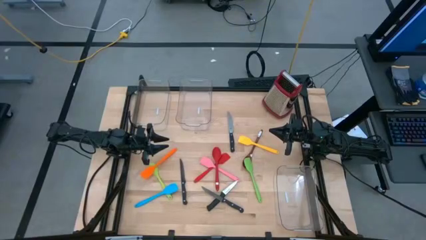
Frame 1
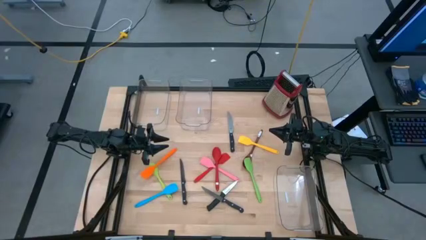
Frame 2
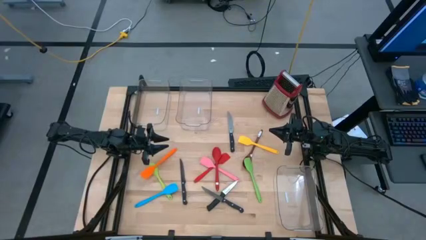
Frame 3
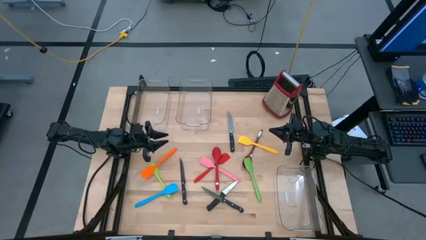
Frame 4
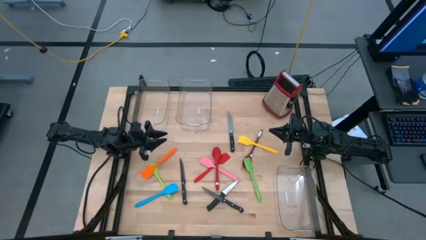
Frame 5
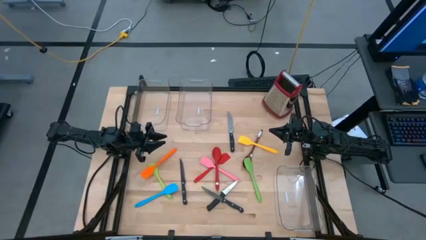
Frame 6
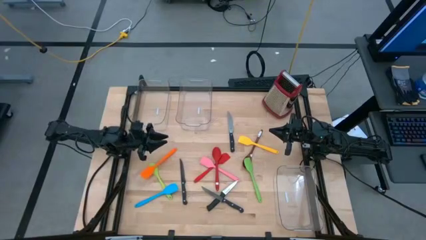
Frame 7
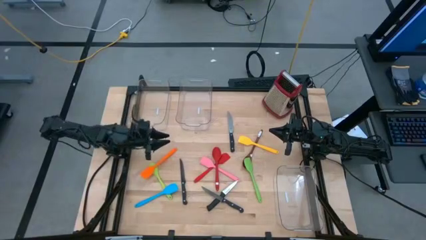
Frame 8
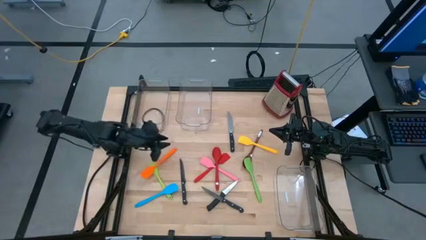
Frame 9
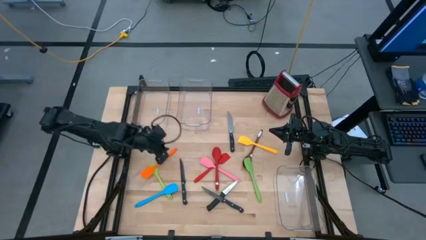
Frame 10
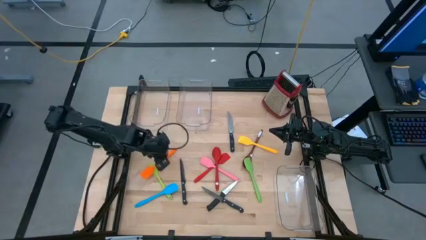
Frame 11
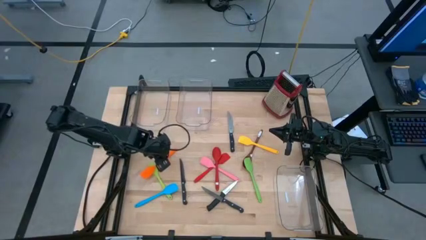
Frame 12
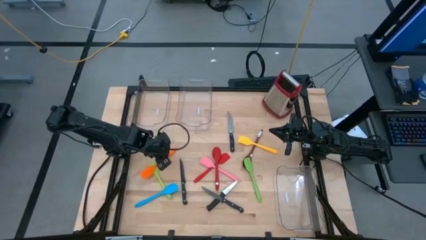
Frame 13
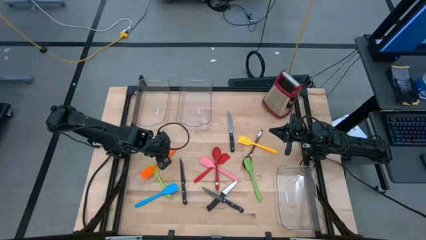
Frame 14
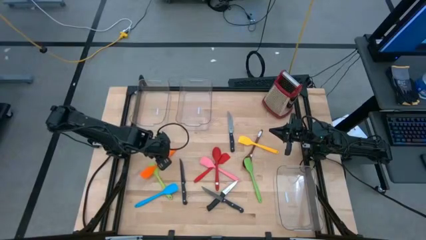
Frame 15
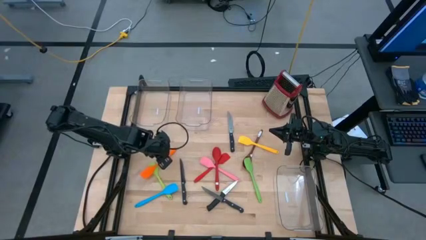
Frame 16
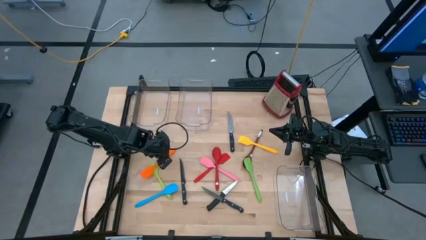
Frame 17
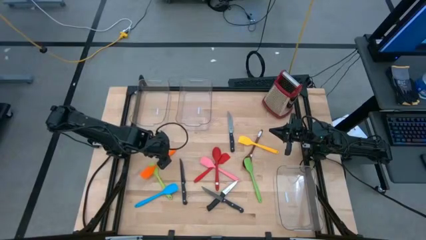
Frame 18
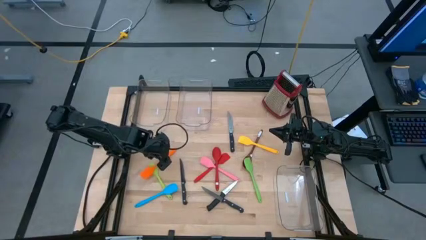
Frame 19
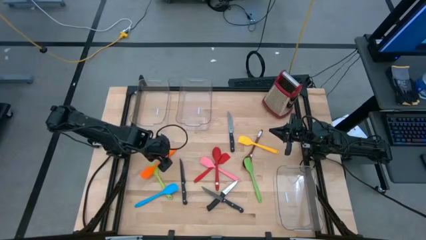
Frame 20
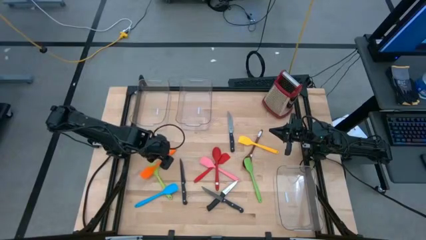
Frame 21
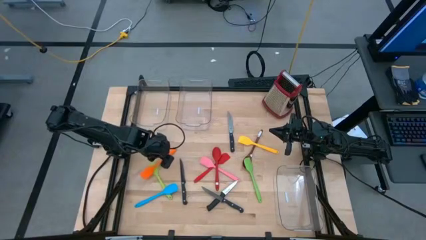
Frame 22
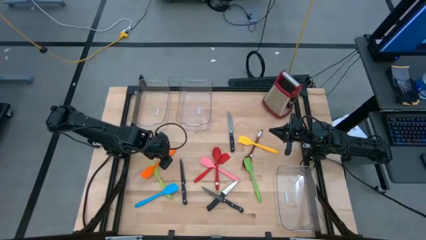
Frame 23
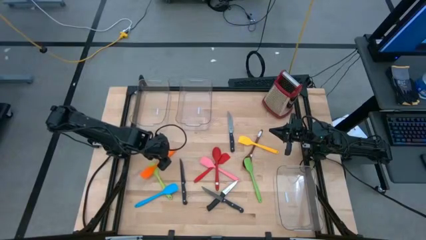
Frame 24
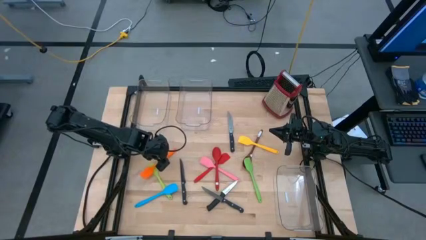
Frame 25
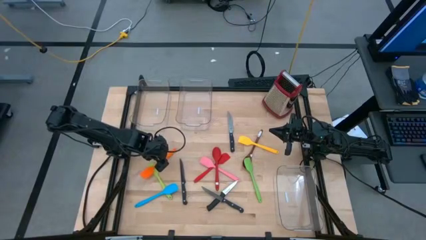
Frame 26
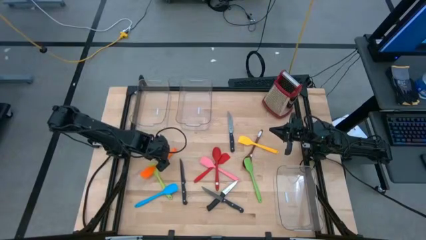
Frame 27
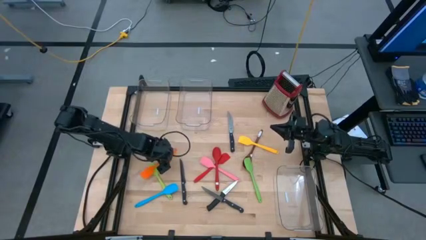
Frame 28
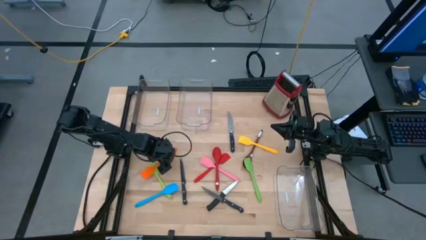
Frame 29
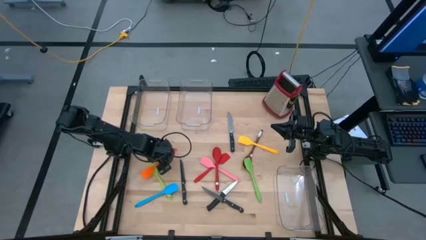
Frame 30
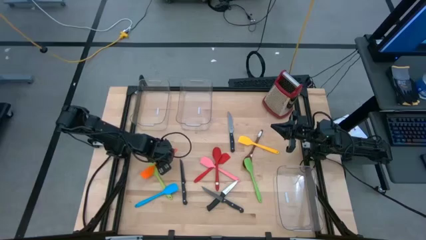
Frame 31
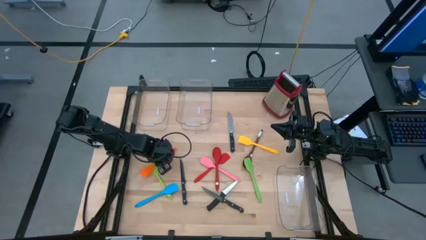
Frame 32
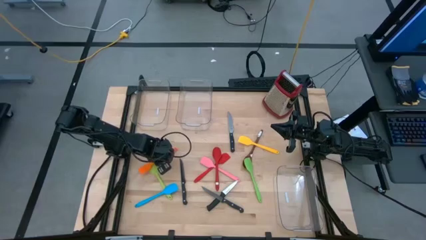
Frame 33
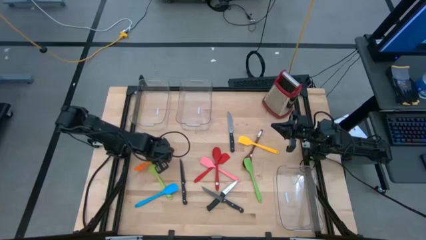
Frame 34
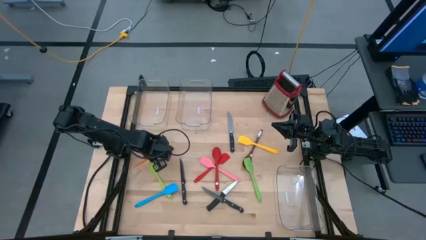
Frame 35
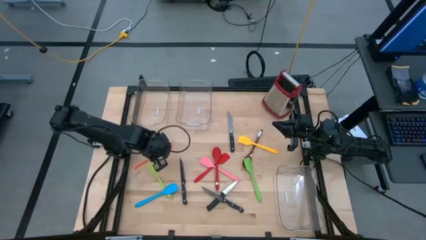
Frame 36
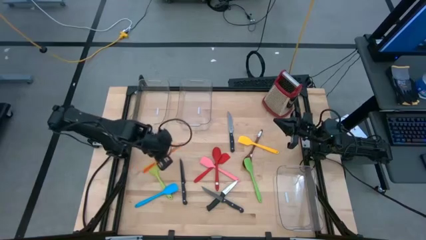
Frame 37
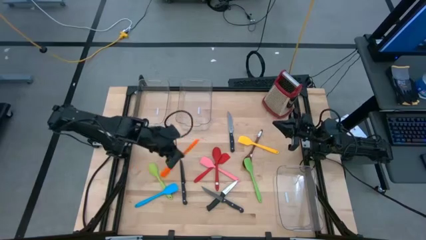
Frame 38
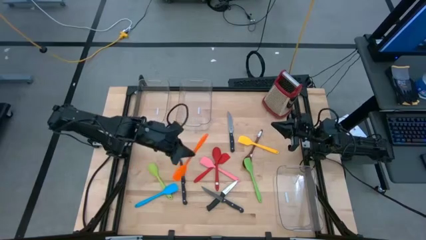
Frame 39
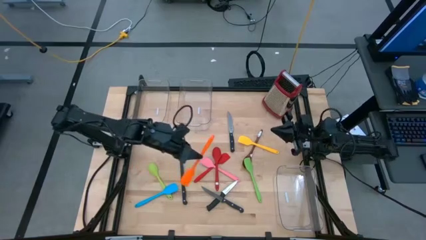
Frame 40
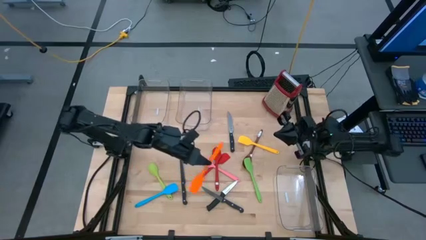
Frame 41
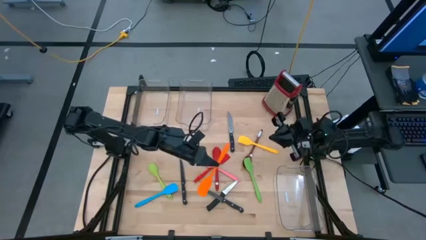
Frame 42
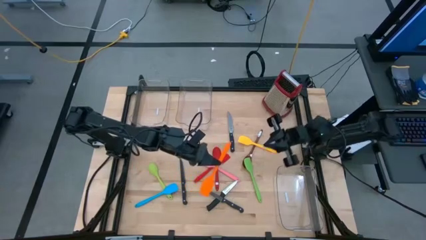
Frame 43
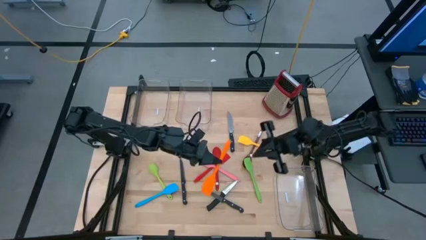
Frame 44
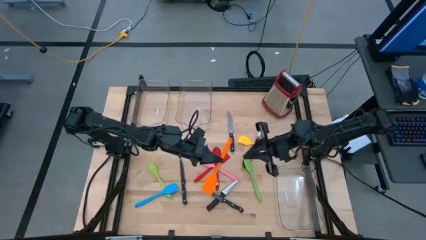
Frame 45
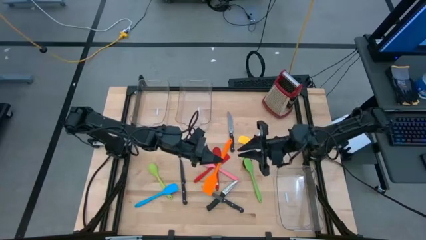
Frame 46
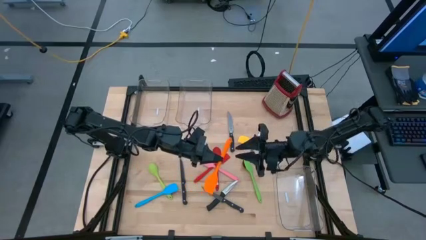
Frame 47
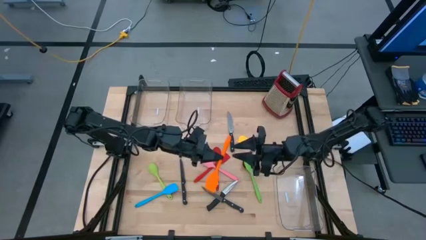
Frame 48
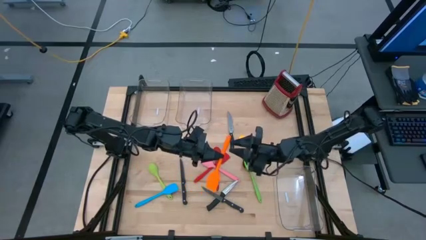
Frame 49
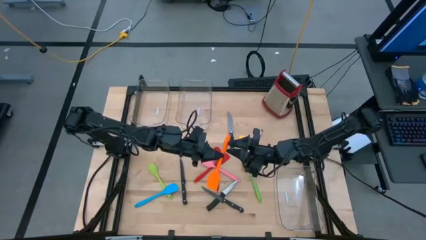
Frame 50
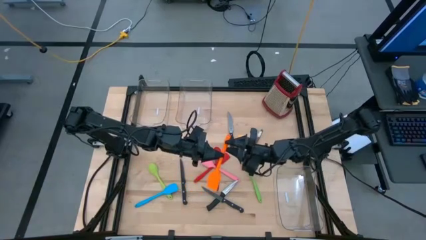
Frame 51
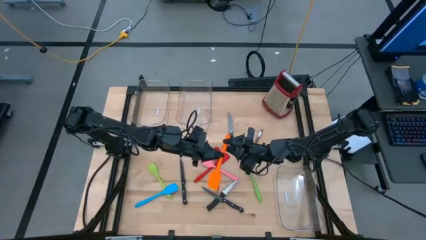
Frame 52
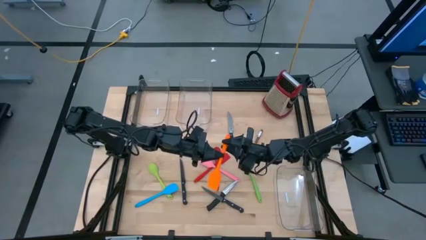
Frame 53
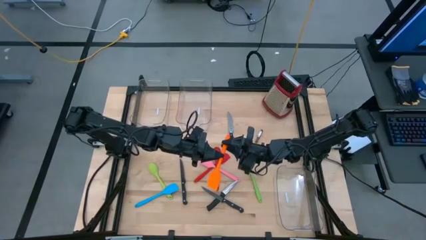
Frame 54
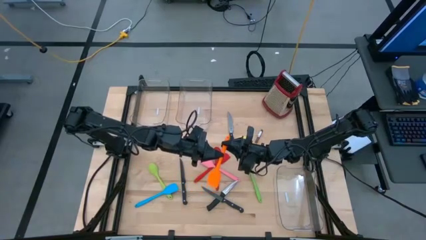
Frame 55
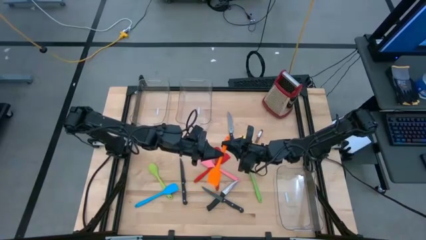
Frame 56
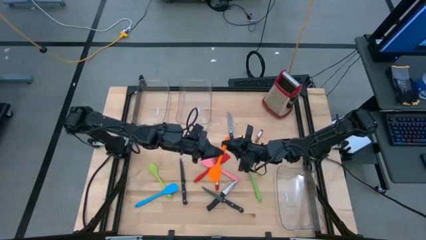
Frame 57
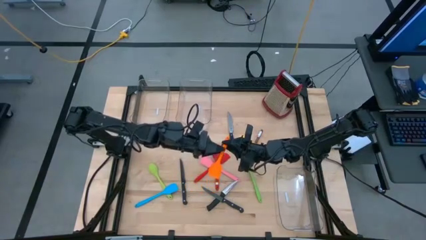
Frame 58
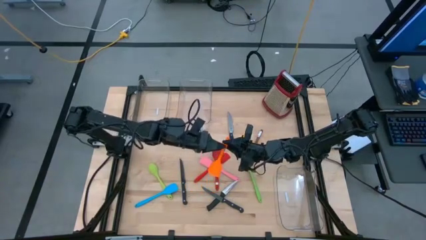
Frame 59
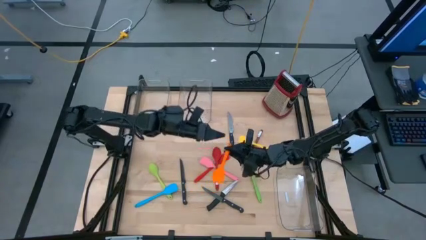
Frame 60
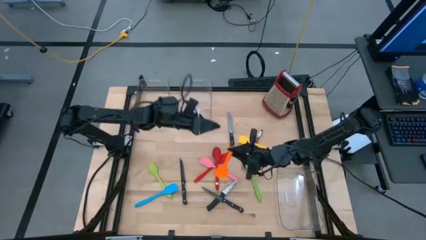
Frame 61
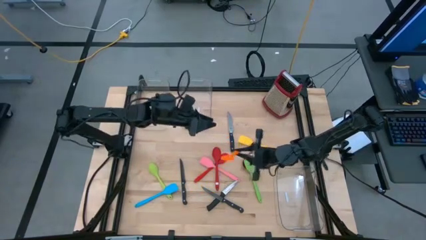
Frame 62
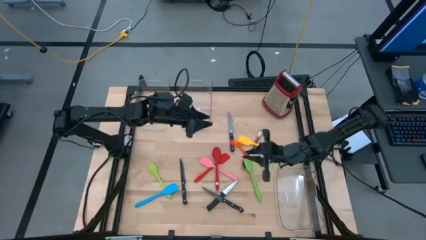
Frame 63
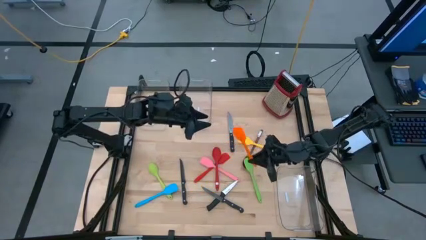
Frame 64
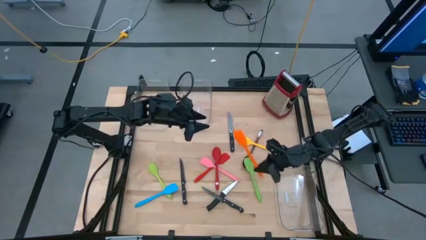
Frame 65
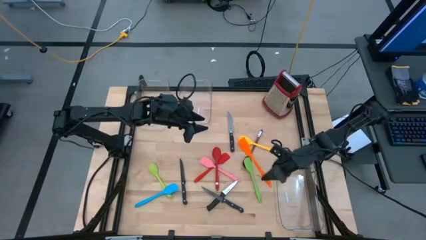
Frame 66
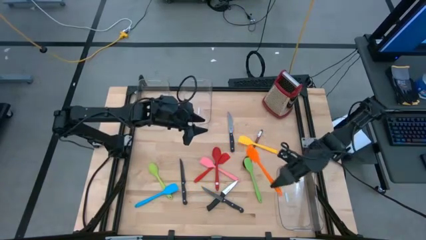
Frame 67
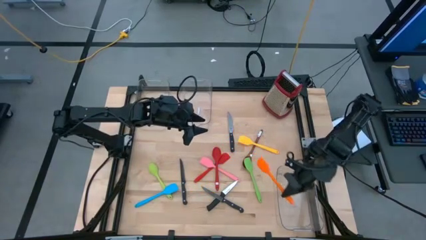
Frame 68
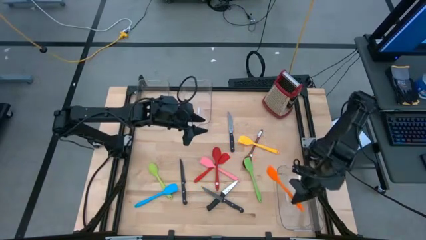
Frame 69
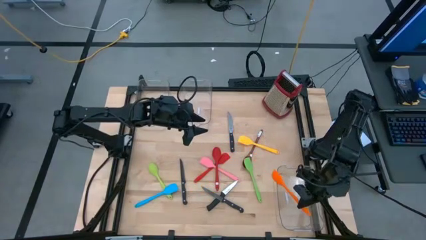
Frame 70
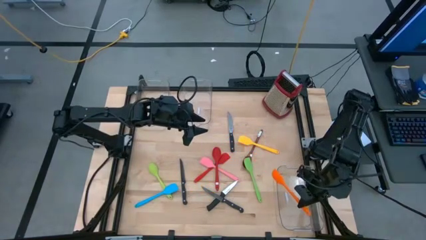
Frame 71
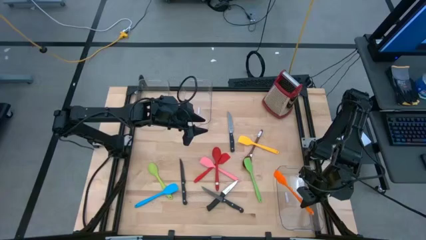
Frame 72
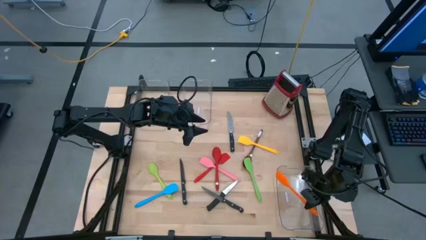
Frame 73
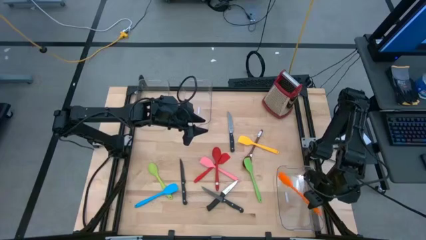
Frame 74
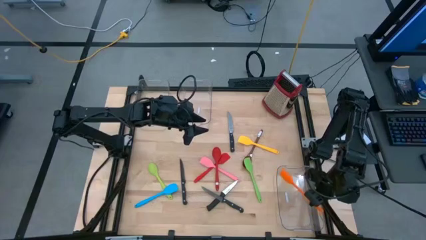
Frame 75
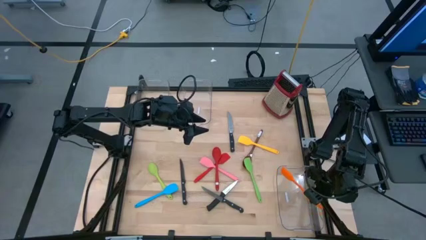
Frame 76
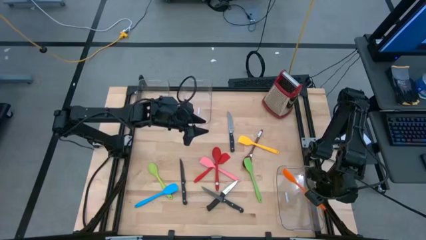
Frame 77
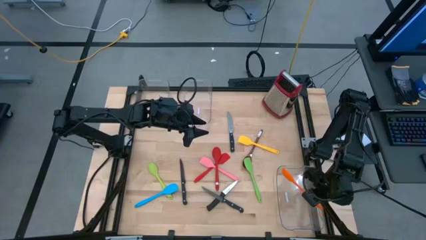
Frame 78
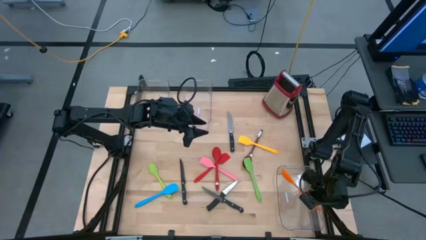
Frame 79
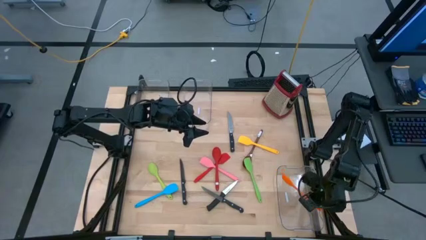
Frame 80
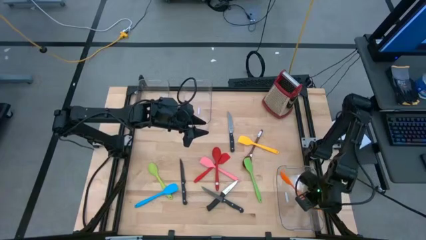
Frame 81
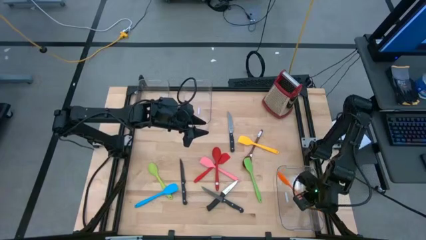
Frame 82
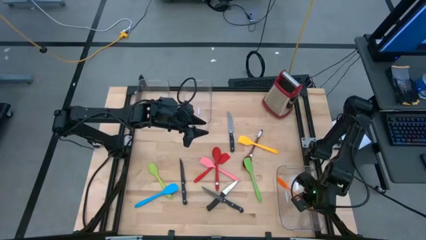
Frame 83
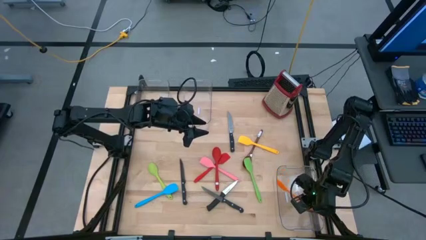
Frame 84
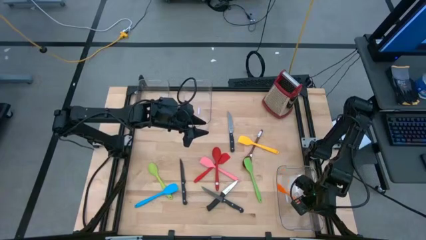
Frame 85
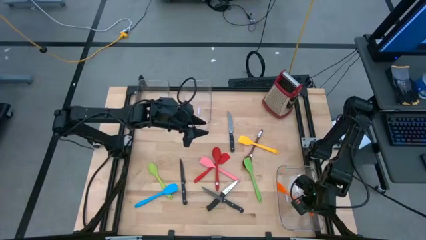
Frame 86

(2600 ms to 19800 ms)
Task: Pick & Place Kitchen Items
Put the orange spatula into the bottom transparent bin
